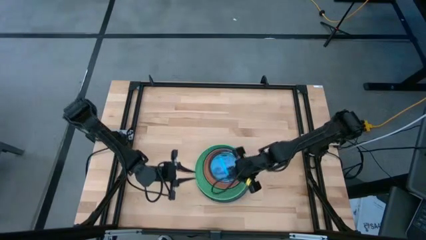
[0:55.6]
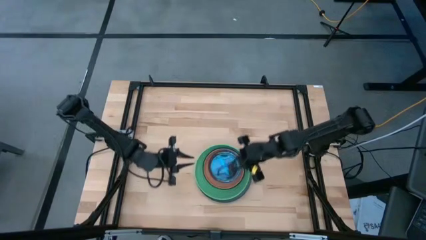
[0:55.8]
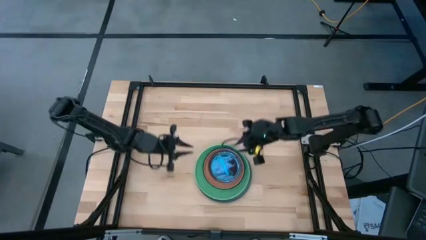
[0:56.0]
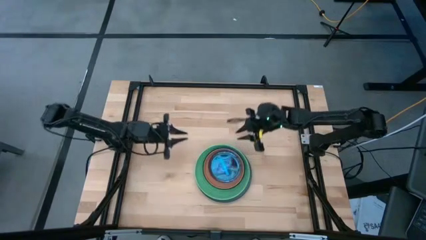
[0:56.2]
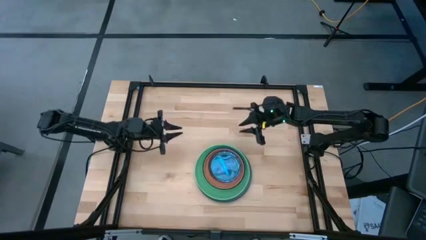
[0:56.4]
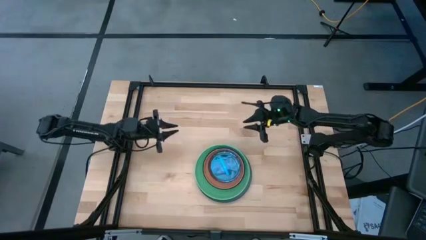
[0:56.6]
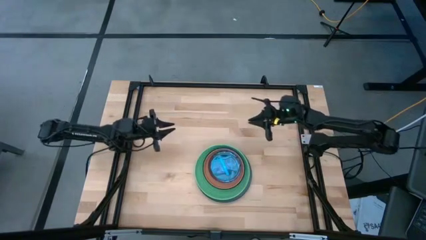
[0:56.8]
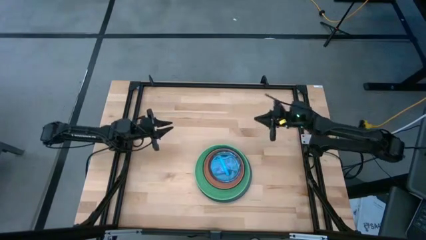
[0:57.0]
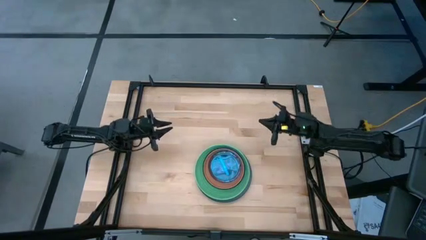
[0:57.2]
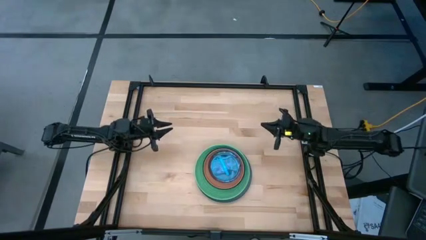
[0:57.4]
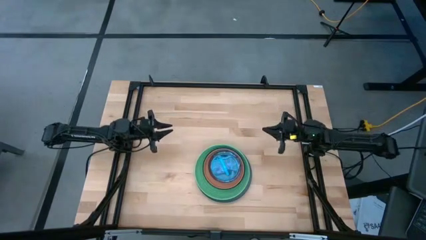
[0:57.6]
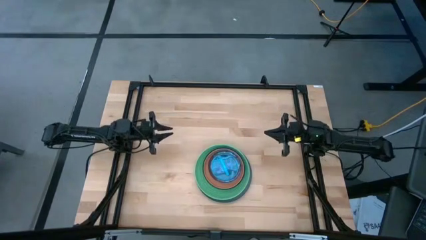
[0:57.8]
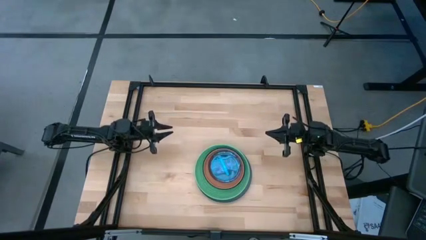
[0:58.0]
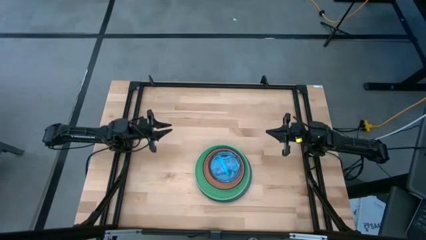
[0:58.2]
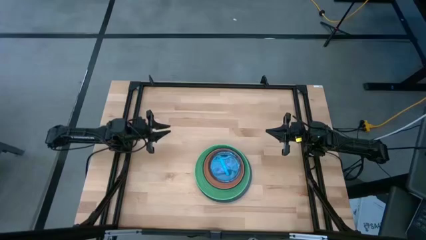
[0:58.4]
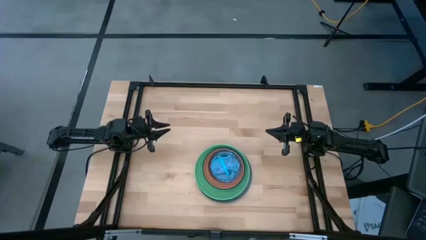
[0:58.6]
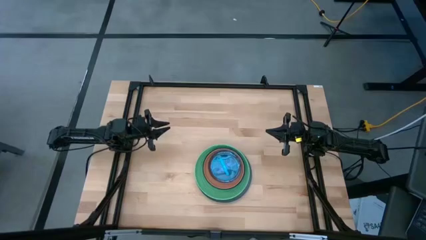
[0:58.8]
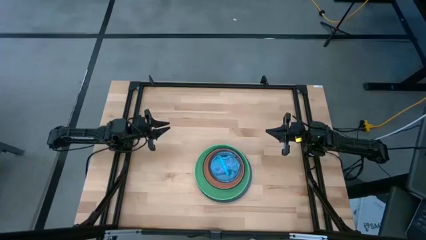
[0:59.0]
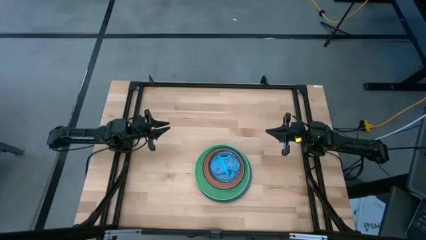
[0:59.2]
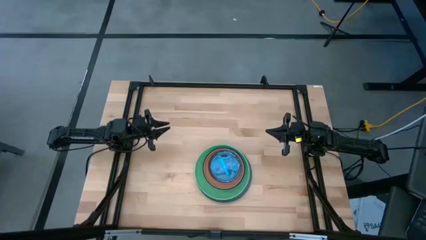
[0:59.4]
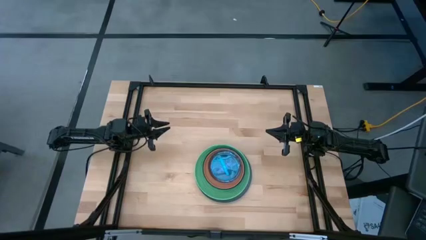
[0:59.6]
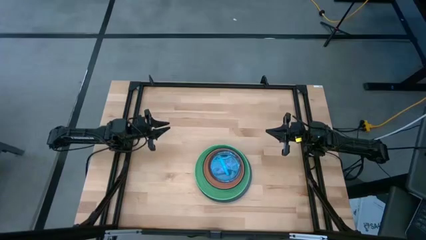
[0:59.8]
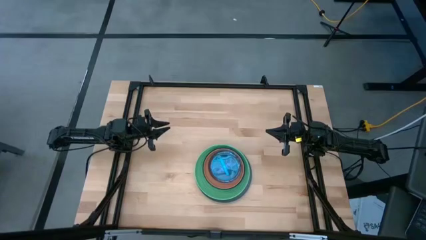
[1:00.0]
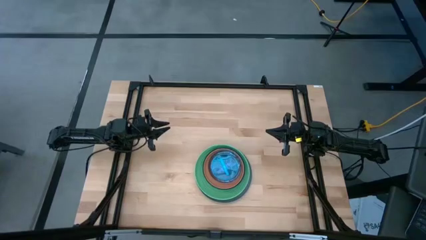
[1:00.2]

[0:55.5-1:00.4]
Task: Stack plastic plates
Return to Home Position

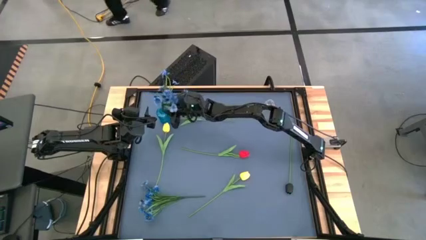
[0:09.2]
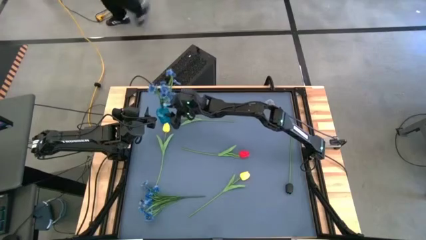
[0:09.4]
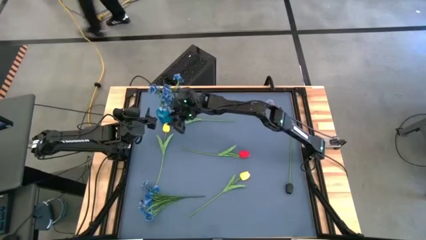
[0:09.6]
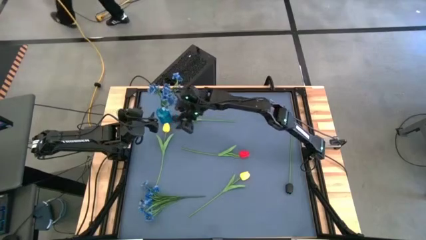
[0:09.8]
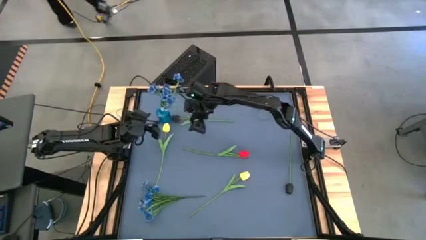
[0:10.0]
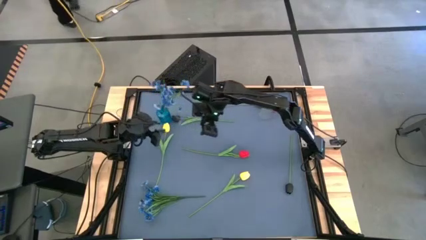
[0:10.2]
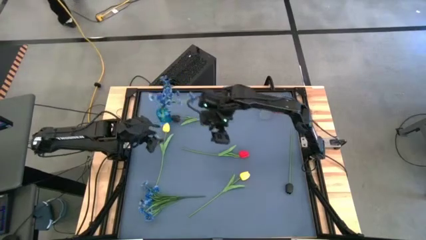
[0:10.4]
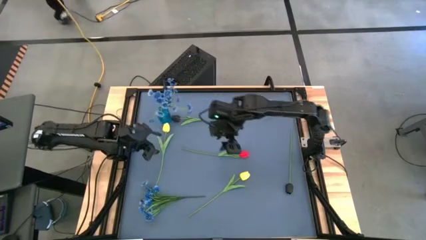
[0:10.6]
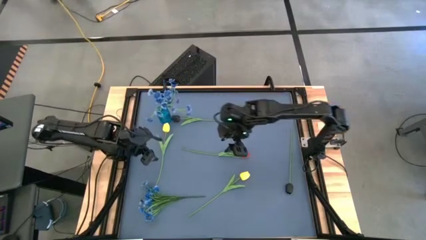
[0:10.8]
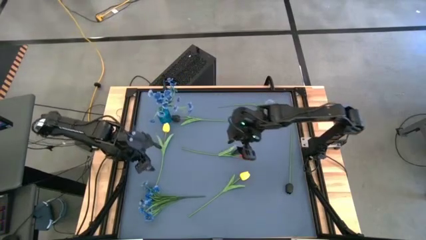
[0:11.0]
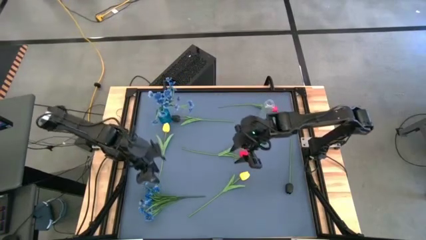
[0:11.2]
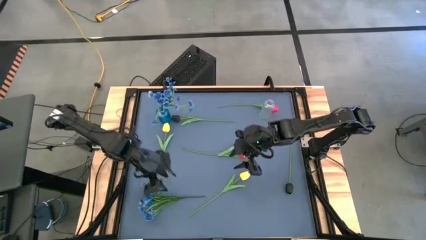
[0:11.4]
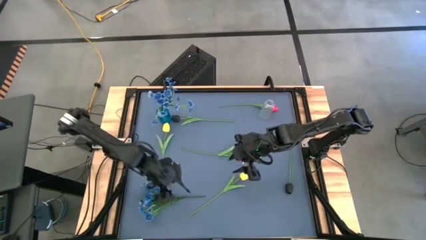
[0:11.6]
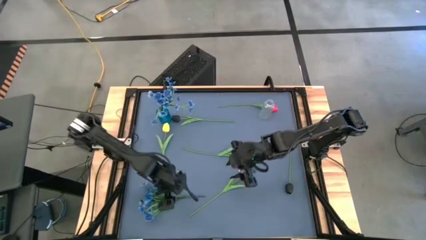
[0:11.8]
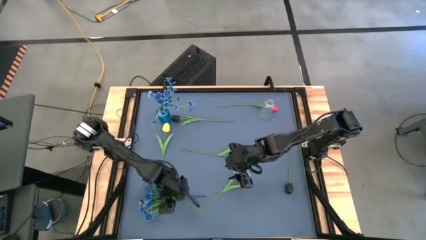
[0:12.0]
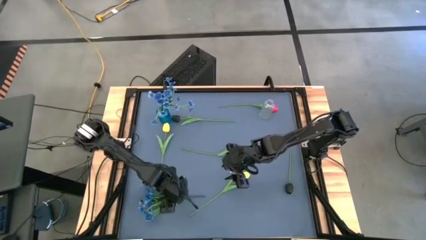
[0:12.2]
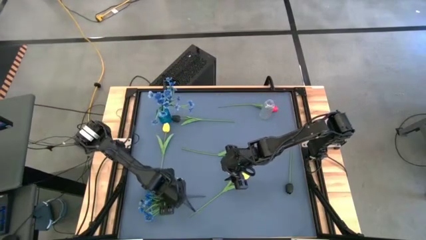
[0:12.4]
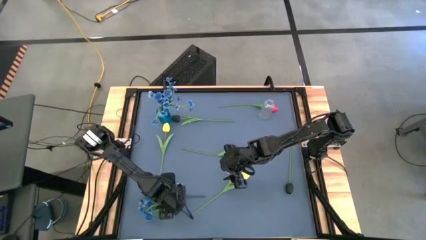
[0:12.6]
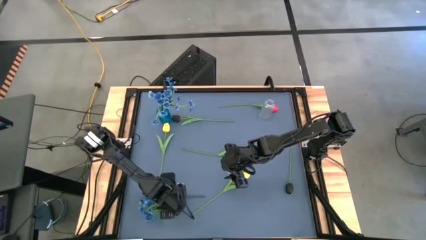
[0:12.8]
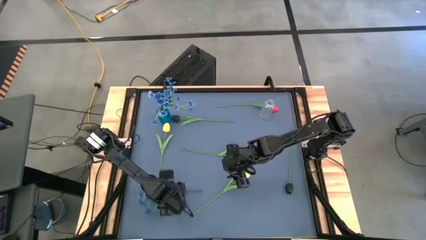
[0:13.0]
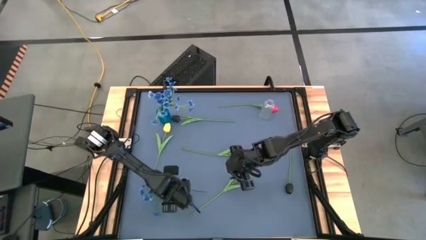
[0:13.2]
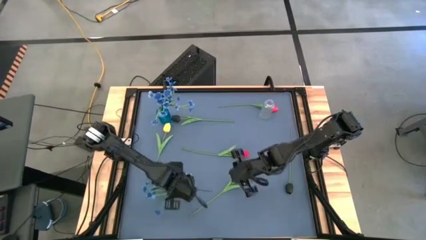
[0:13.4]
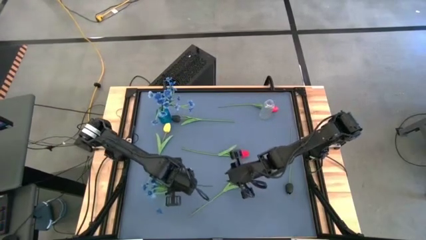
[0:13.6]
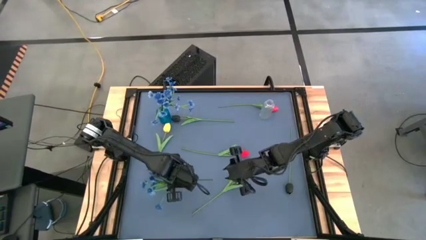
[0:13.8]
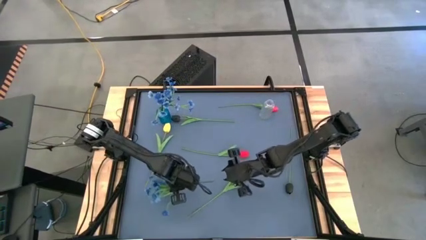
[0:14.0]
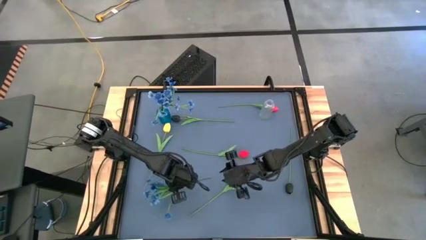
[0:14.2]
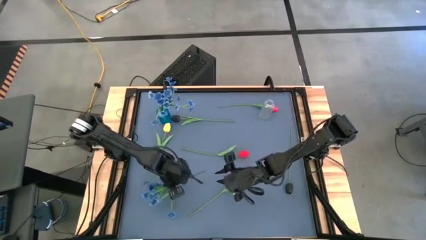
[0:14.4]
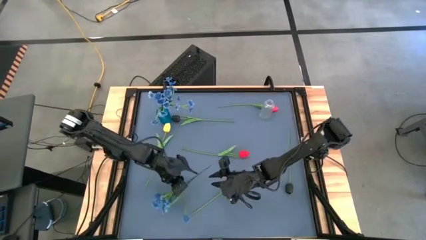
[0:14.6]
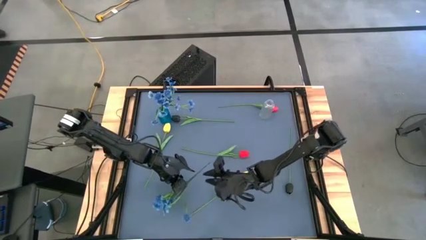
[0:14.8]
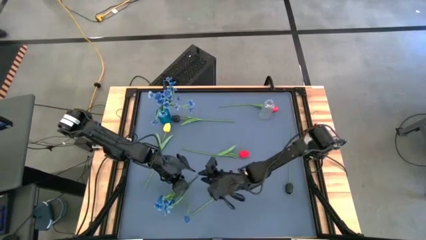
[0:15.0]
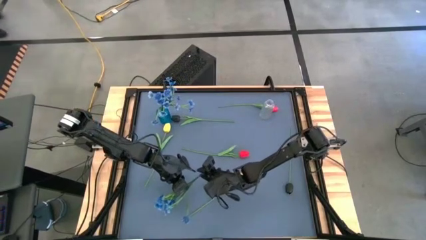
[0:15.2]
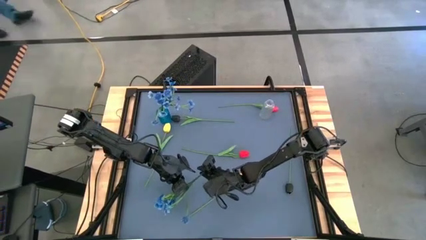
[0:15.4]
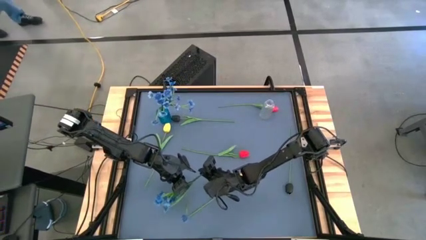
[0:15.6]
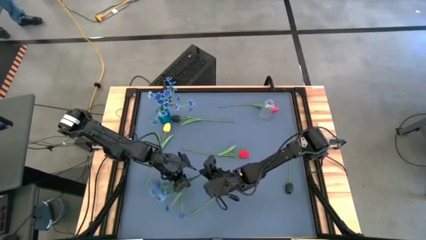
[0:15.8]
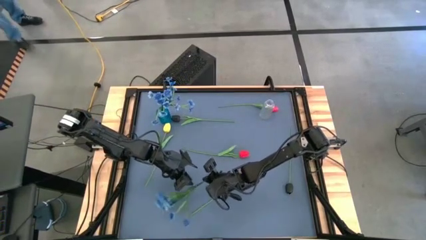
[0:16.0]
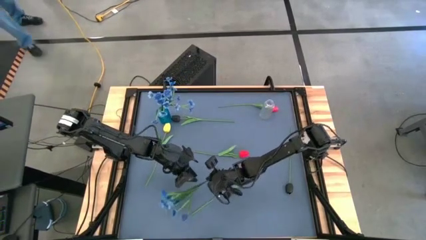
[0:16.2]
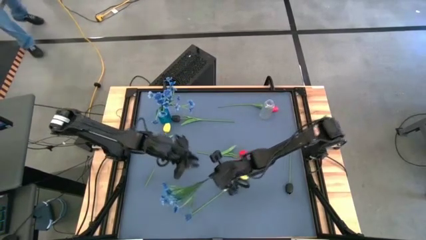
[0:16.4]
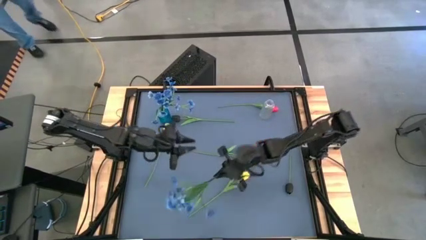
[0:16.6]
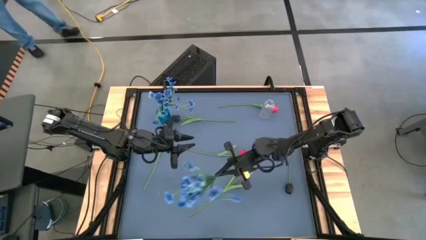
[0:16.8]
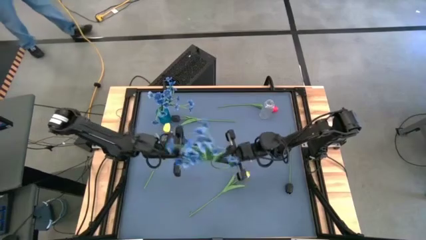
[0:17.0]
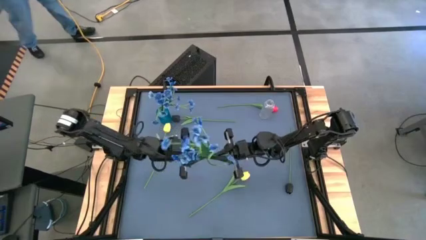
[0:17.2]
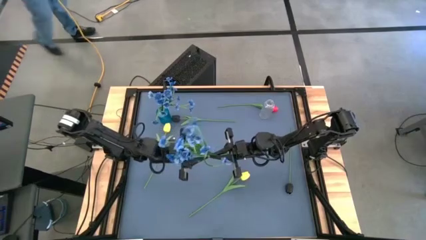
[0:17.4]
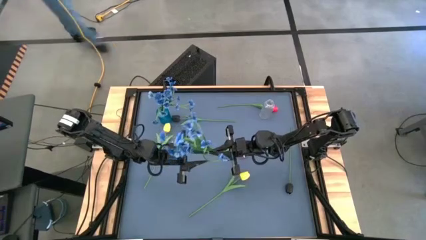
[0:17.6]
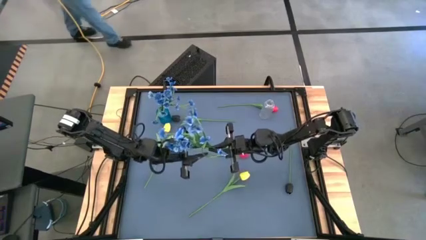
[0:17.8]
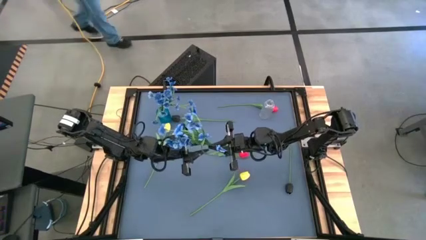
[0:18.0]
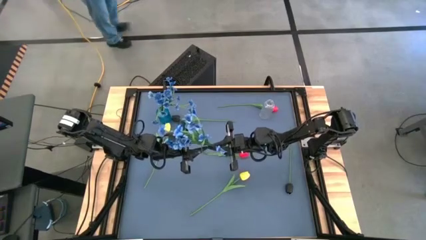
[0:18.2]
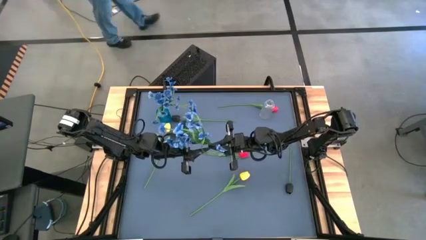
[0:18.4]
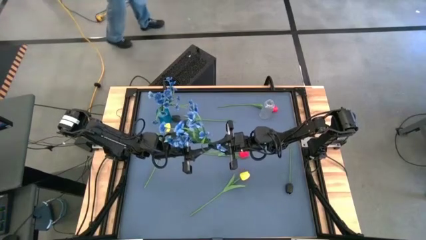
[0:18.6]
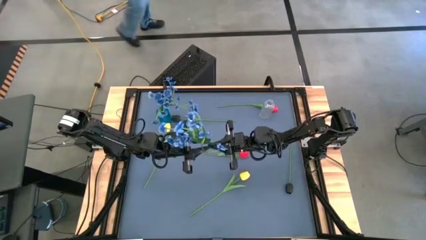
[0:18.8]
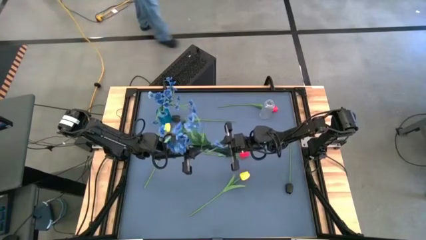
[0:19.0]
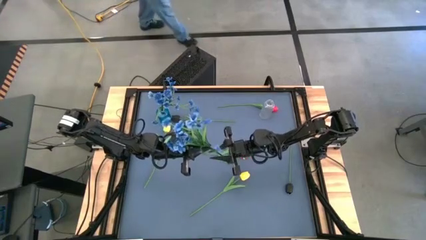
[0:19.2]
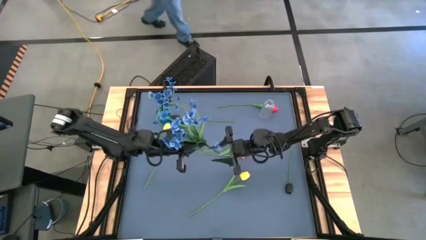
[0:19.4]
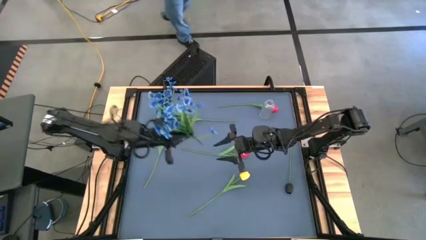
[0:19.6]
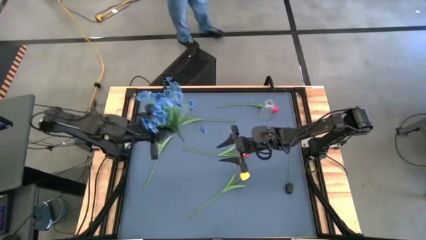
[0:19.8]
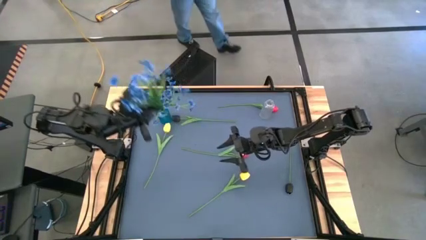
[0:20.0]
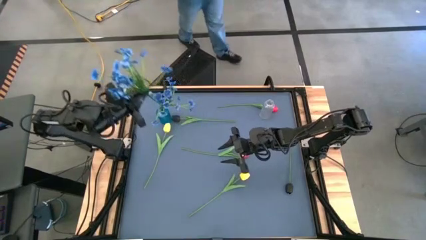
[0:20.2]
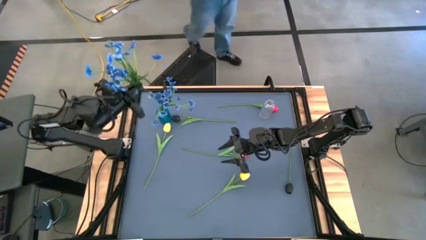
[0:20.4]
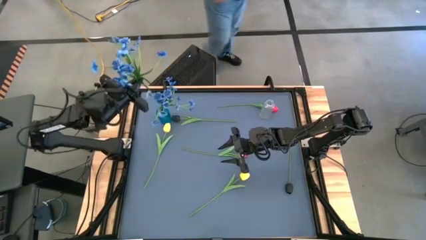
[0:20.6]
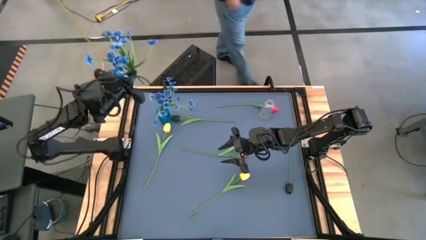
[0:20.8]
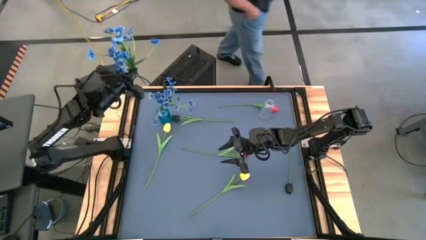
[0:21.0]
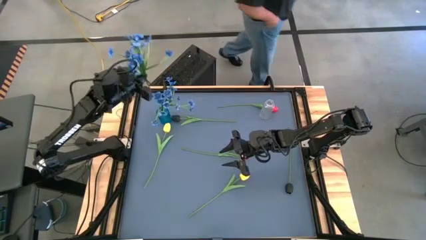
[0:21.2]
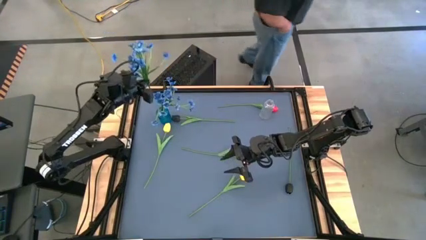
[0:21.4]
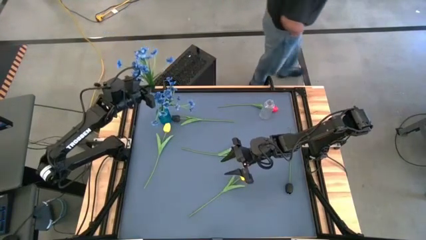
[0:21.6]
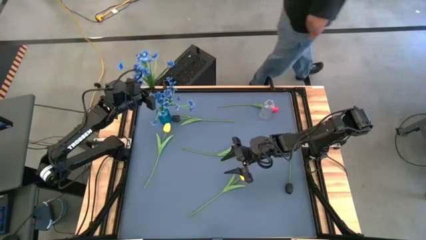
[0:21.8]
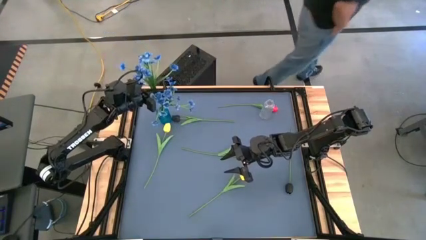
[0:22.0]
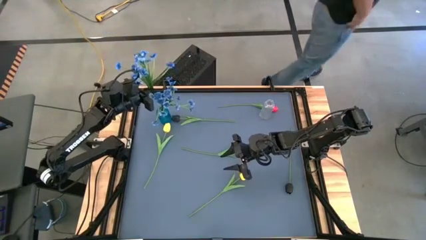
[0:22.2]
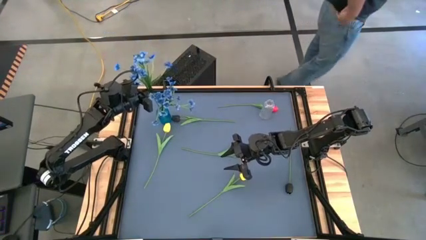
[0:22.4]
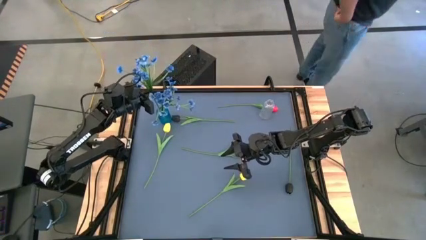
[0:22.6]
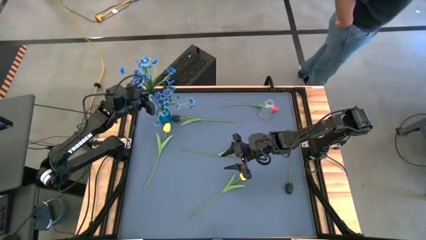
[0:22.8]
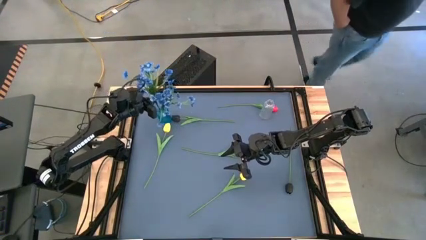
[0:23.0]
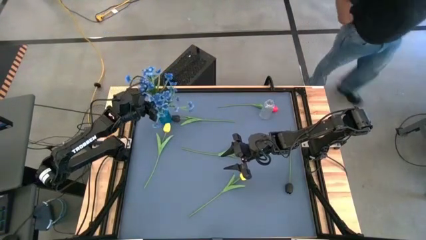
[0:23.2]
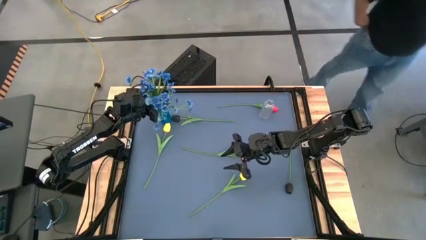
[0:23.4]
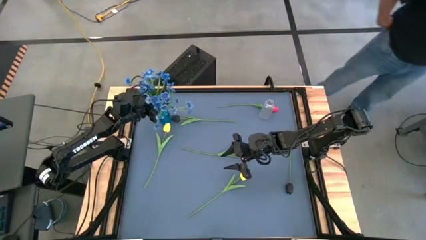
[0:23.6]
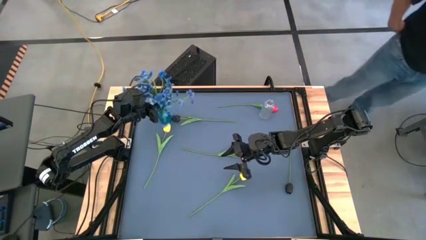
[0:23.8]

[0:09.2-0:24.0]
Task: Sort flowers into vase by color
Put the blue flowers into the blue vase
